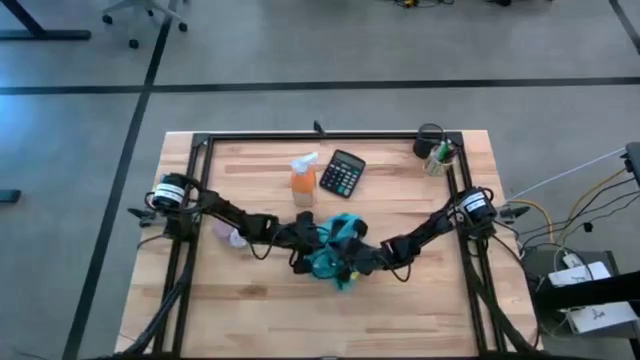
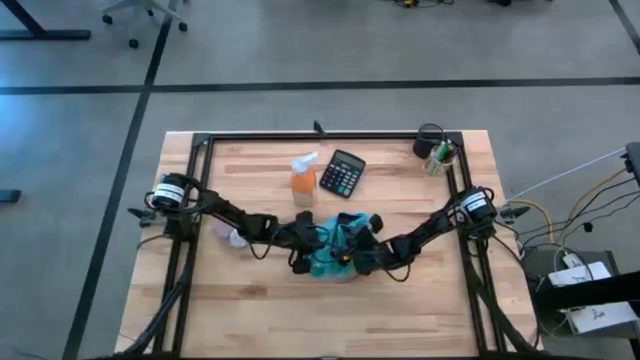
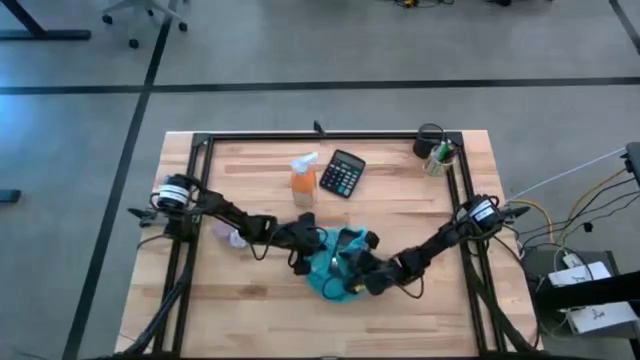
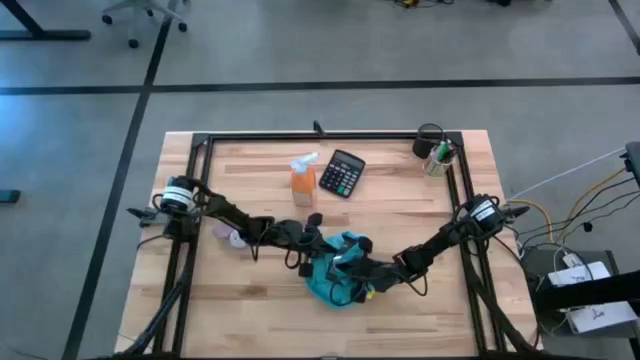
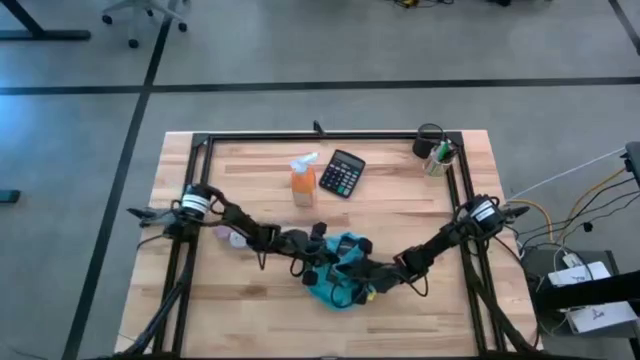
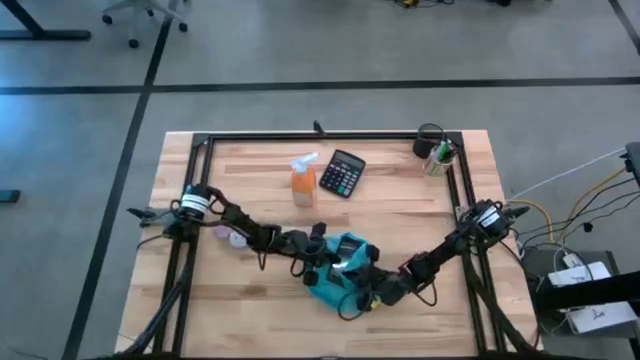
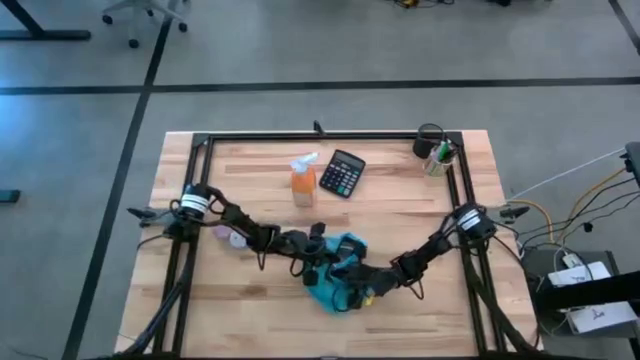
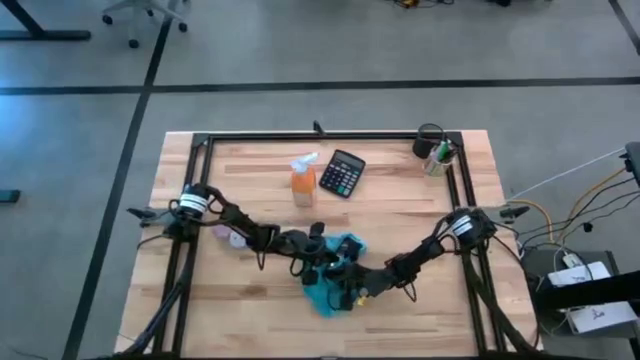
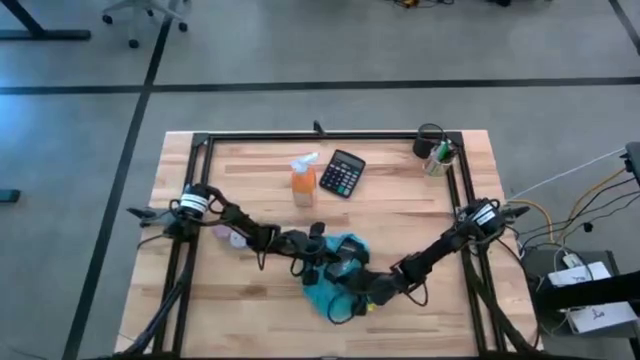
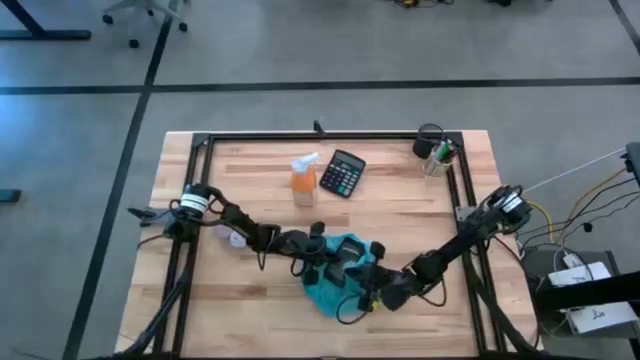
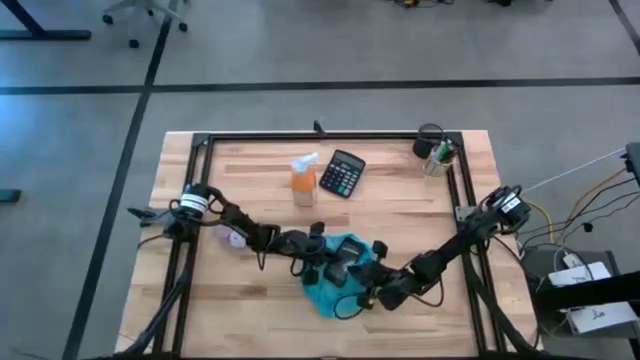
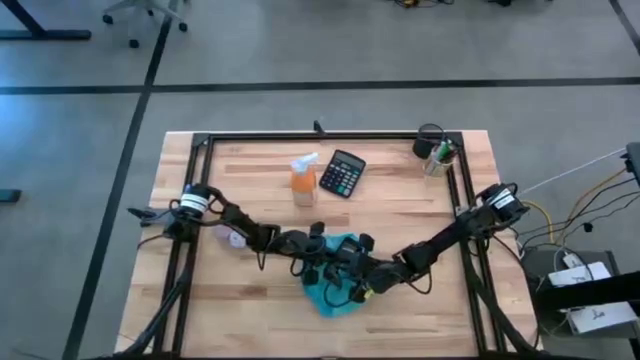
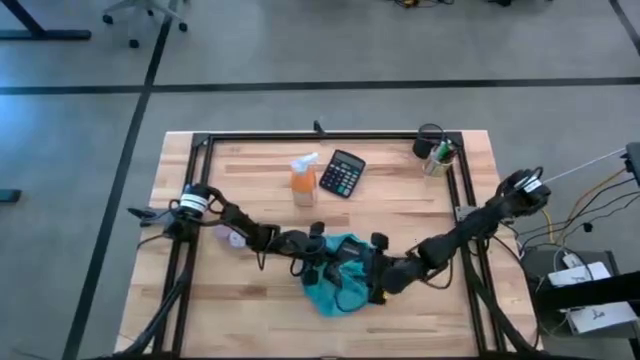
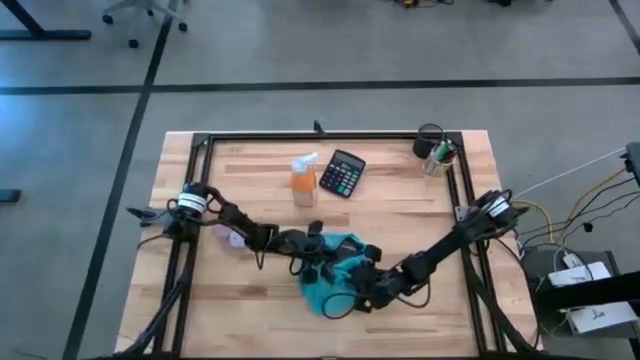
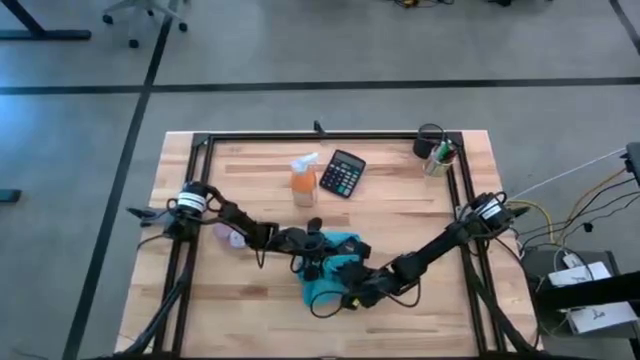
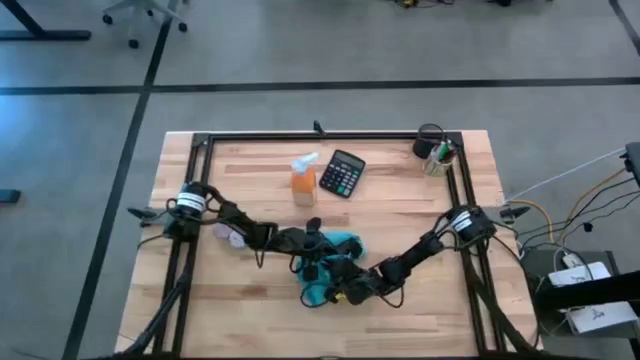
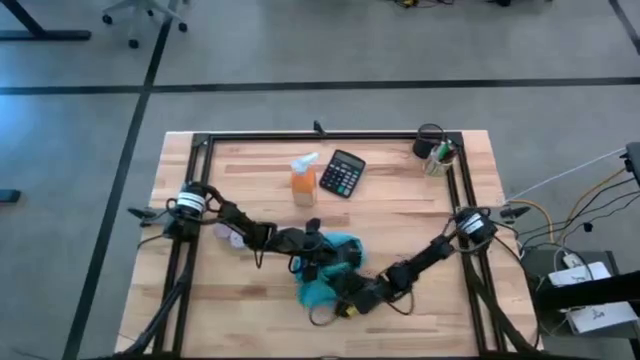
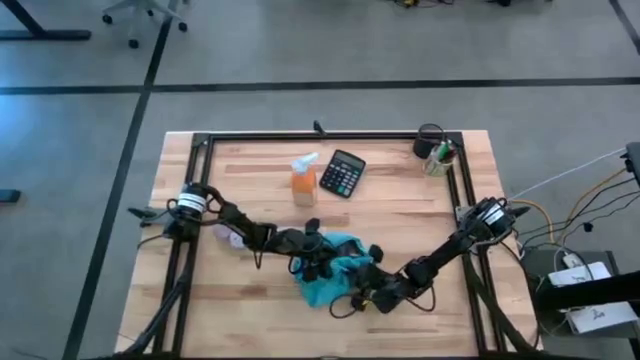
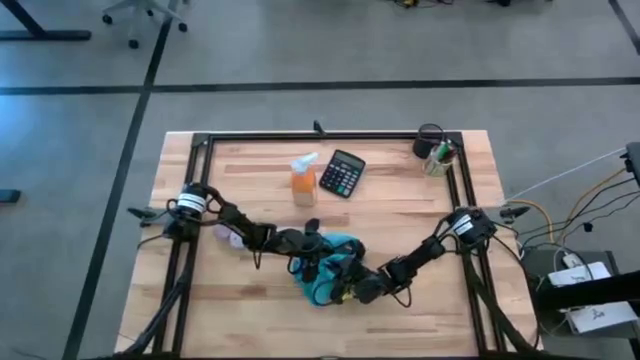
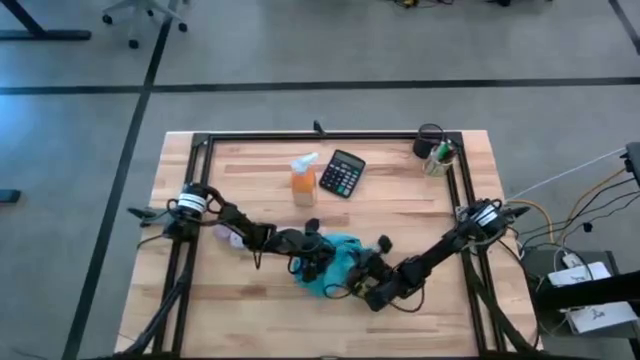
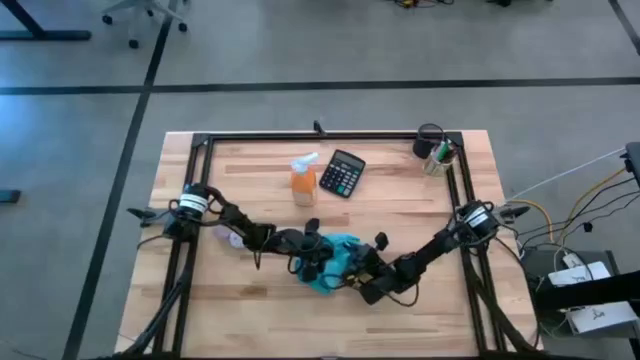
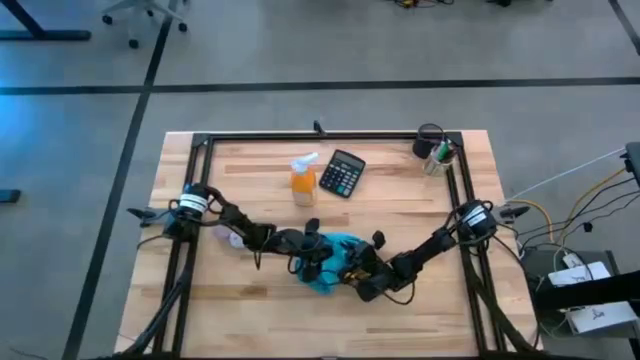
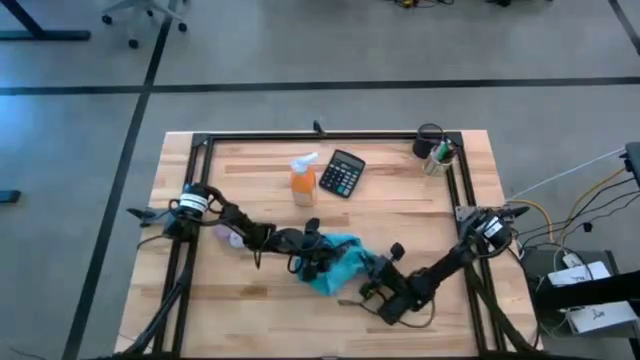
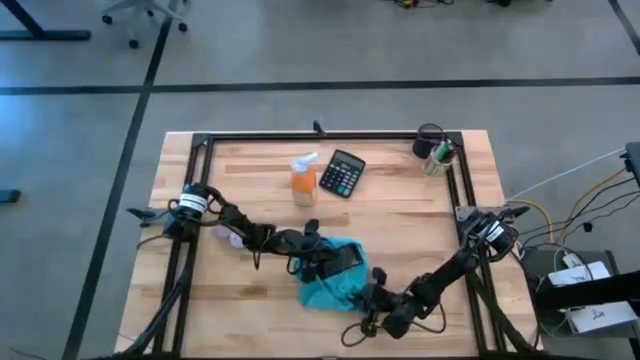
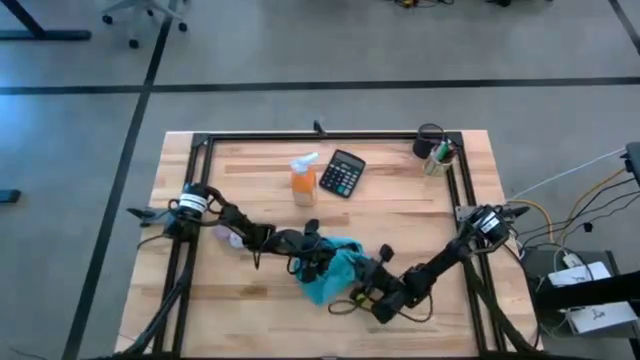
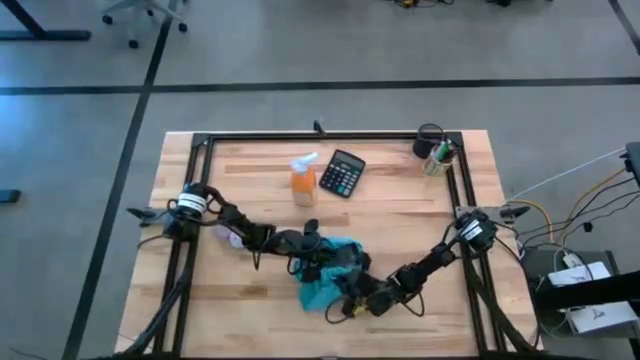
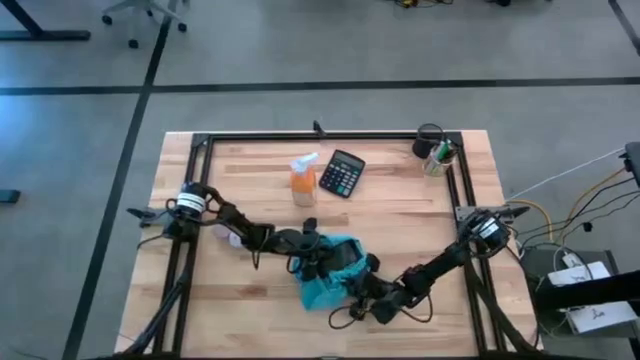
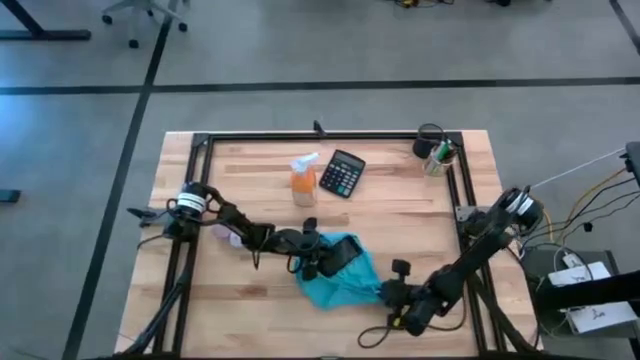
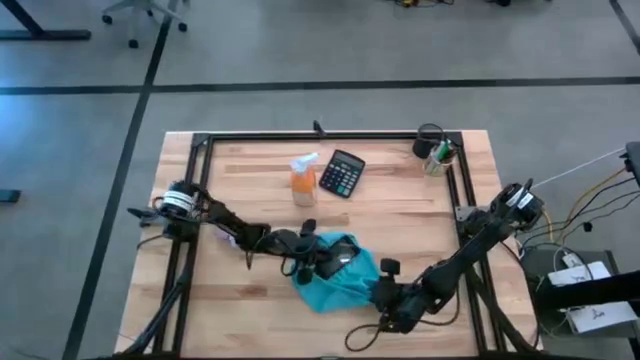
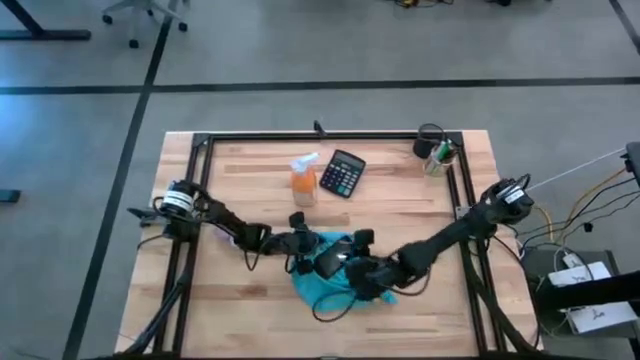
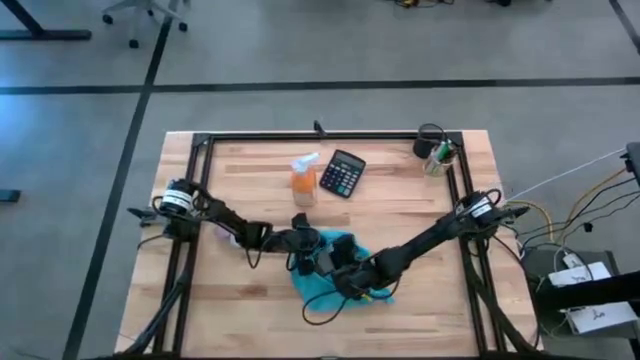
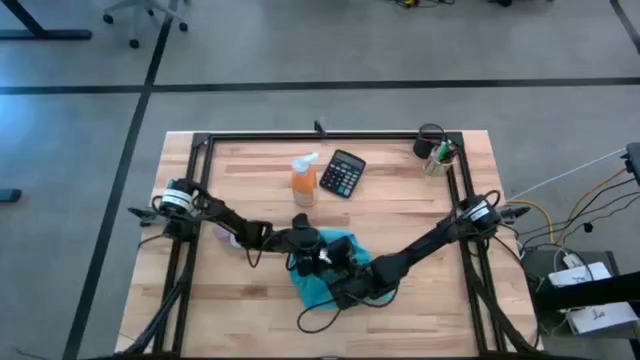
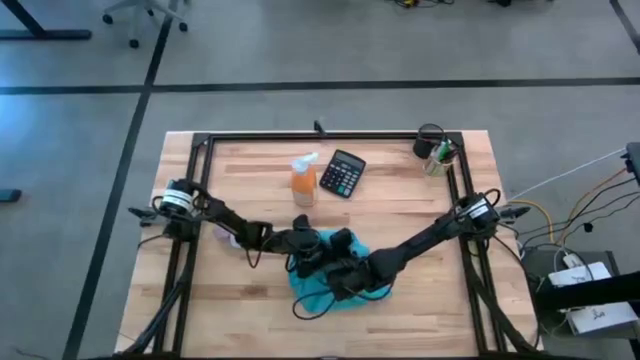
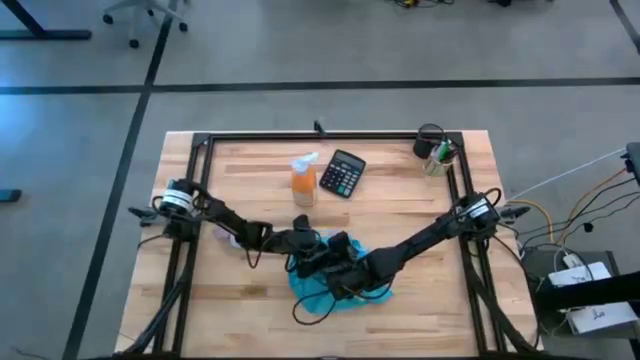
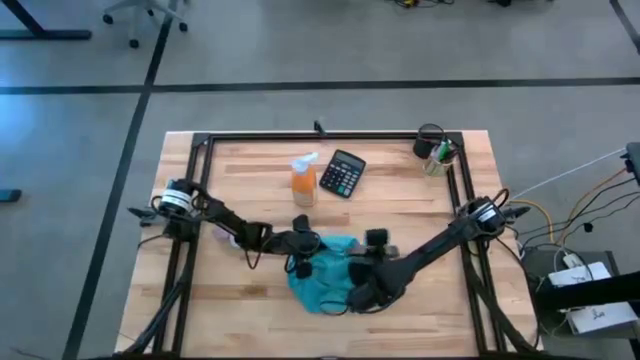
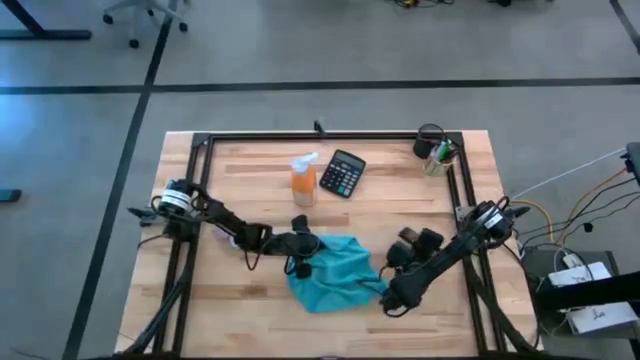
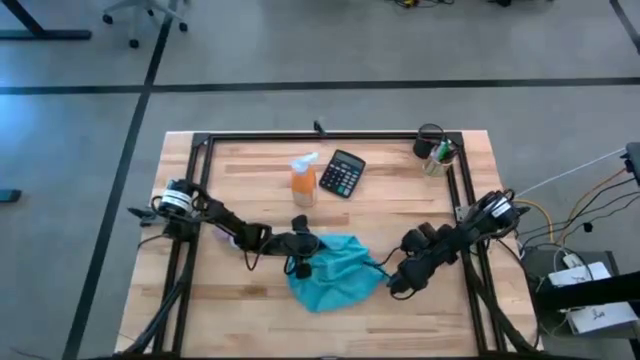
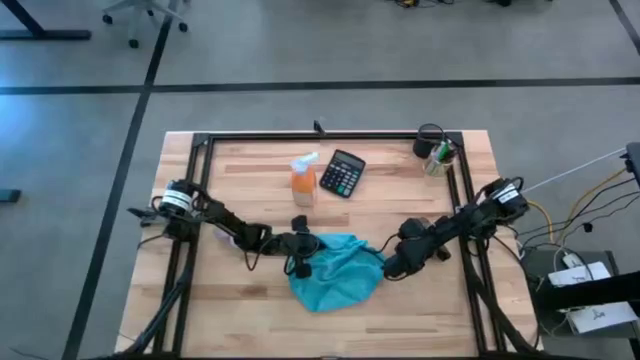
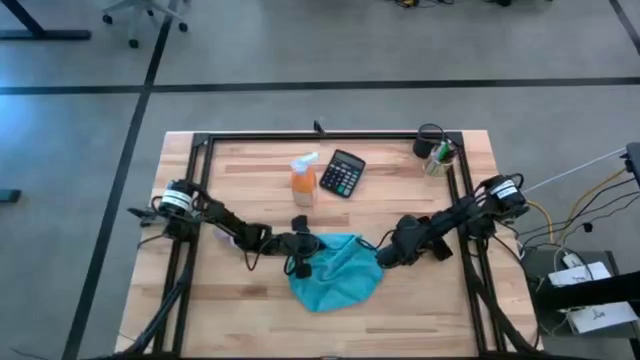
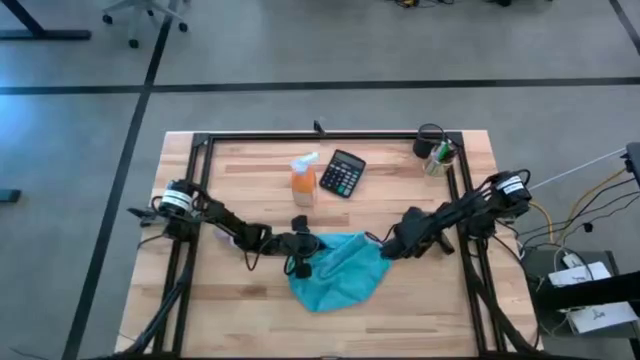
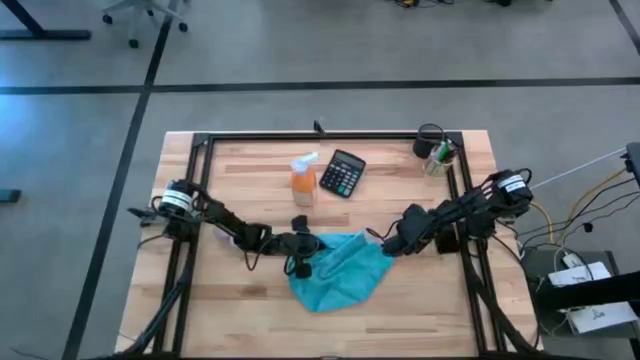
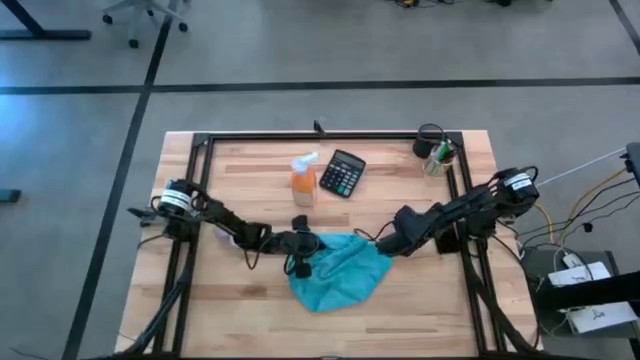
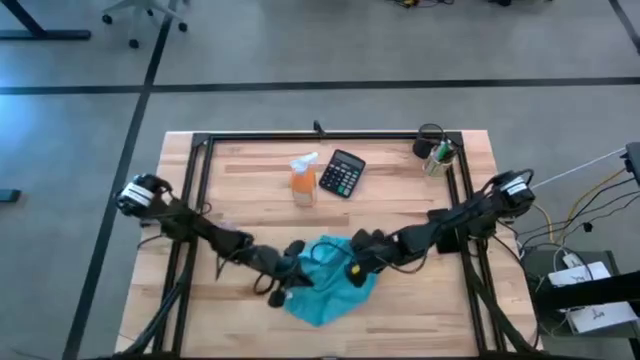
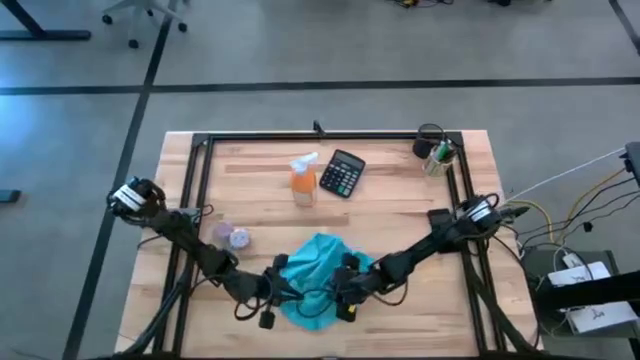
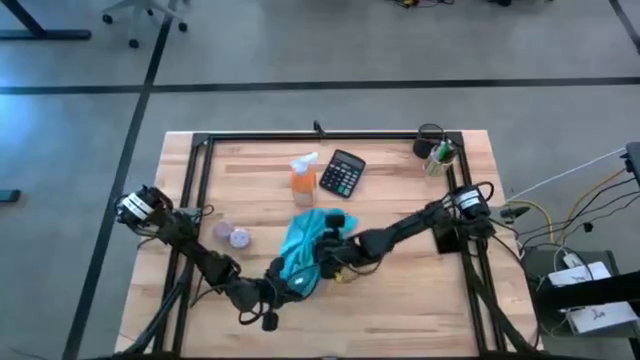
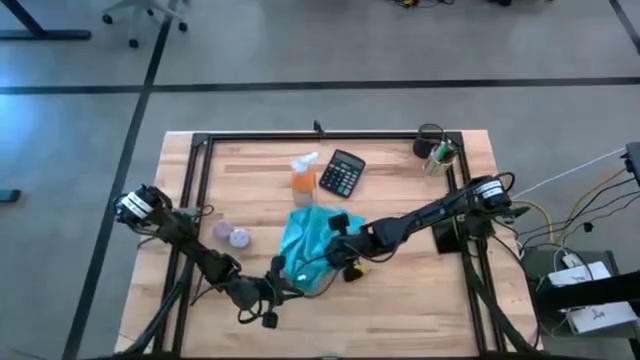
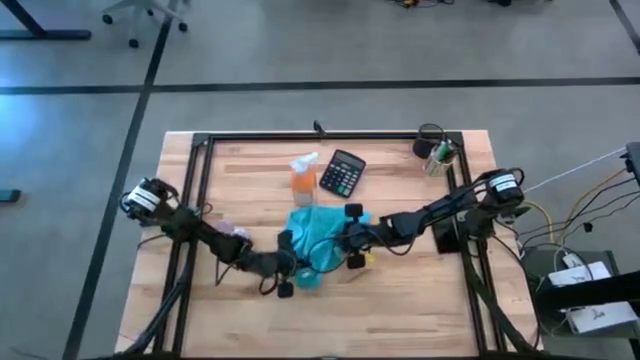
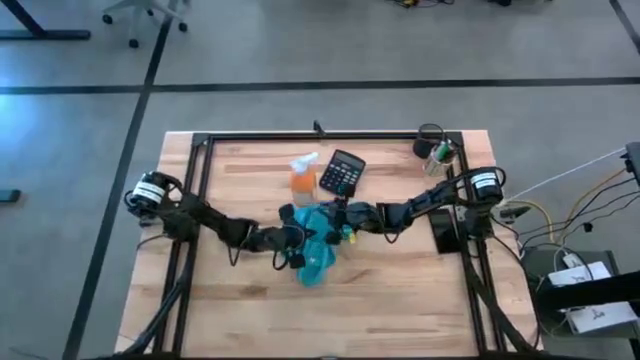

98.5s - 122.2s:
Task: Apply microfiber cloth
Wipe the front and back of the black cellphone with the blue microfiber cloth
